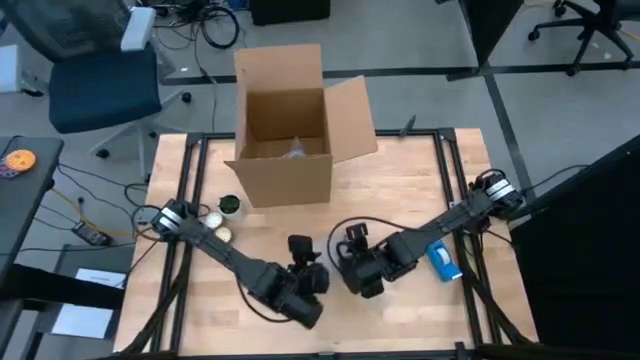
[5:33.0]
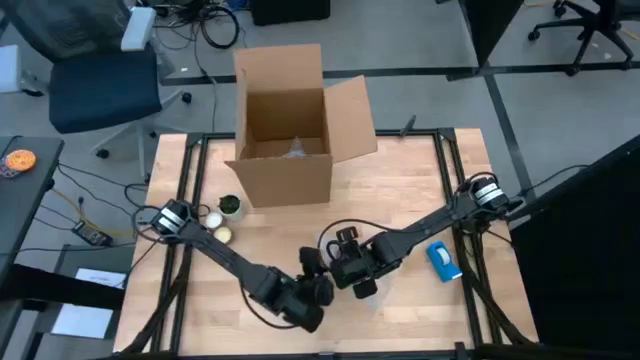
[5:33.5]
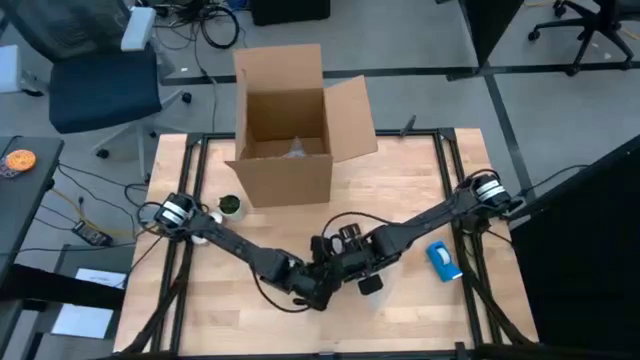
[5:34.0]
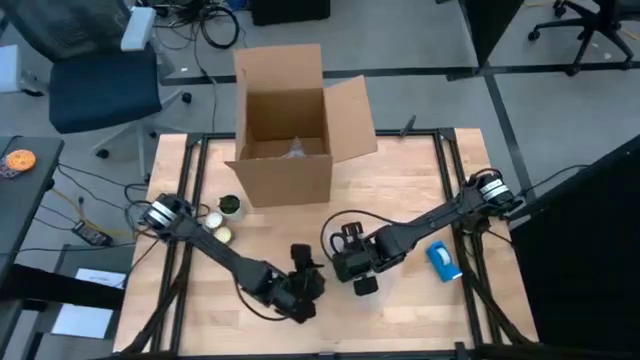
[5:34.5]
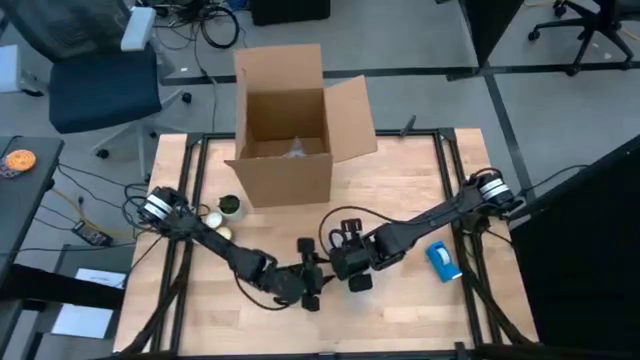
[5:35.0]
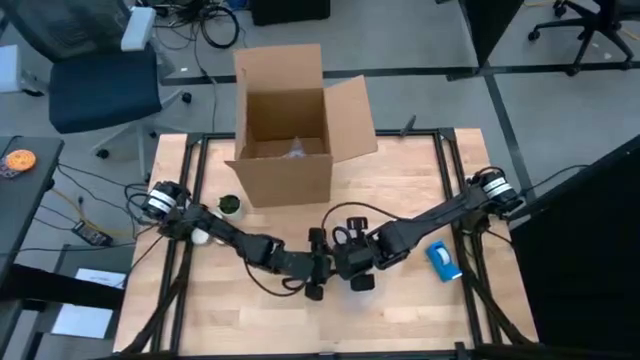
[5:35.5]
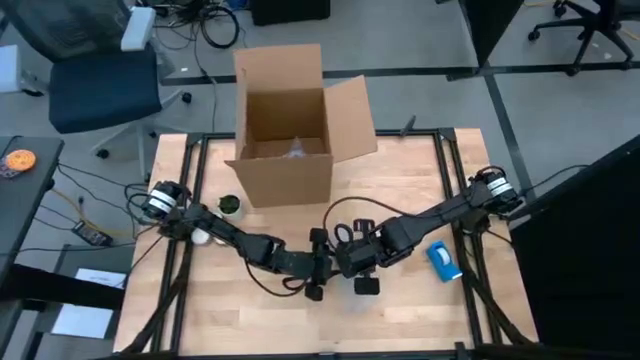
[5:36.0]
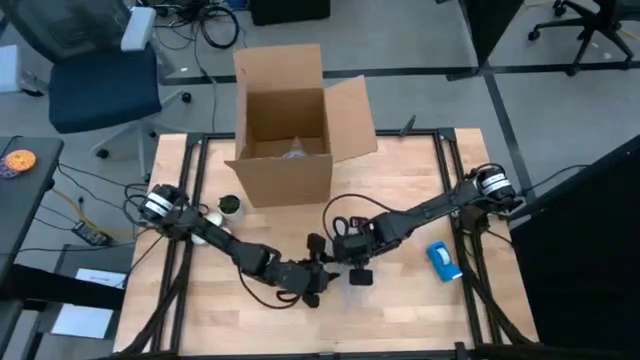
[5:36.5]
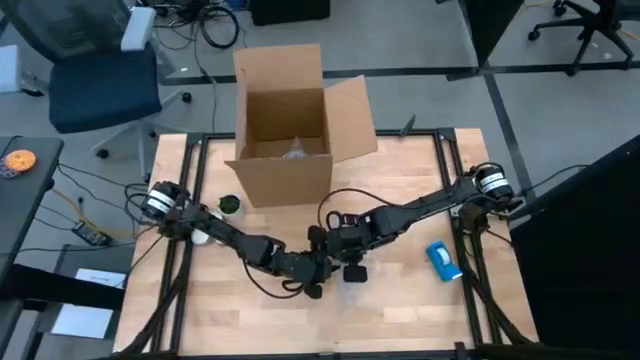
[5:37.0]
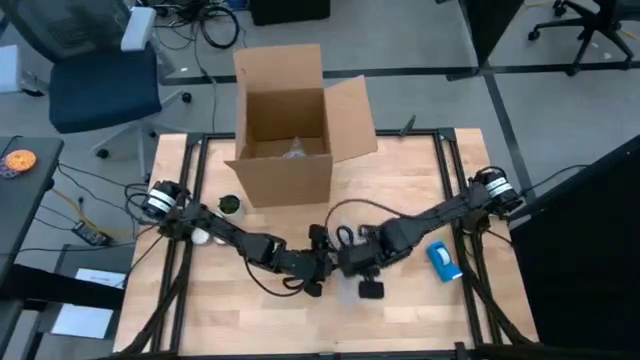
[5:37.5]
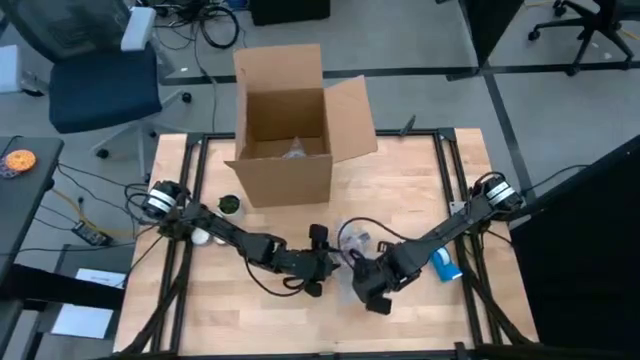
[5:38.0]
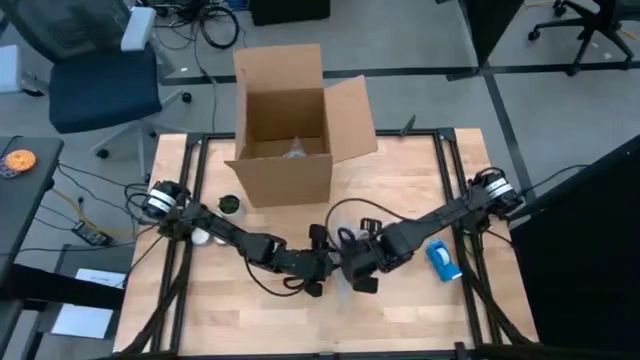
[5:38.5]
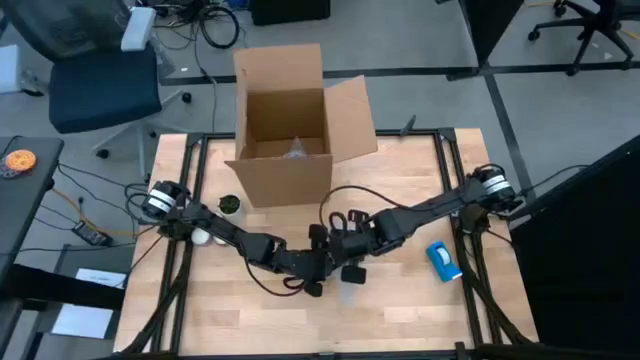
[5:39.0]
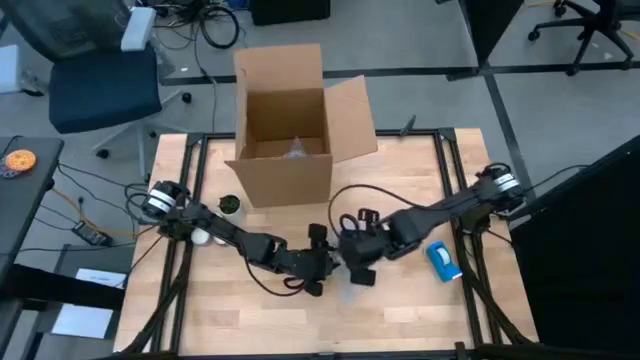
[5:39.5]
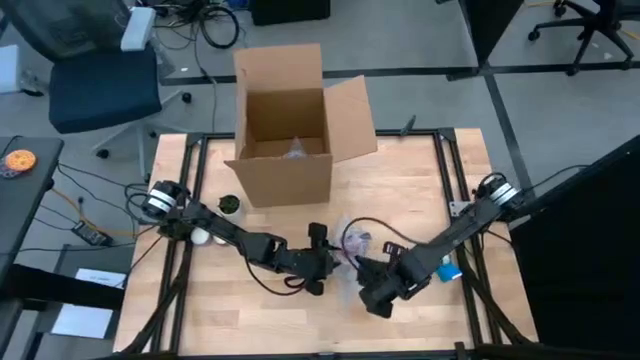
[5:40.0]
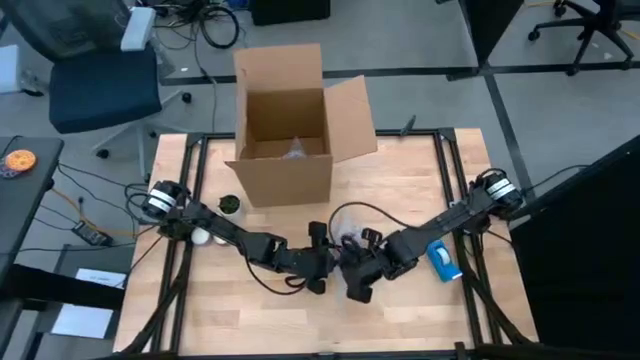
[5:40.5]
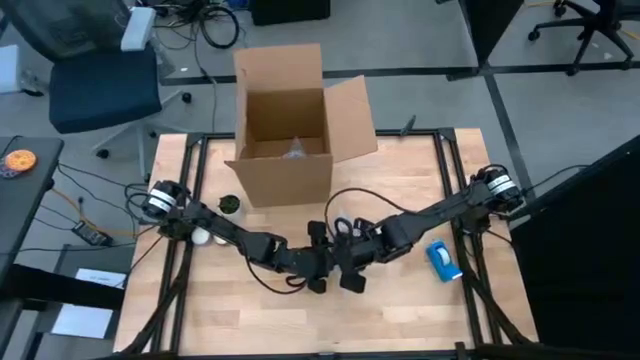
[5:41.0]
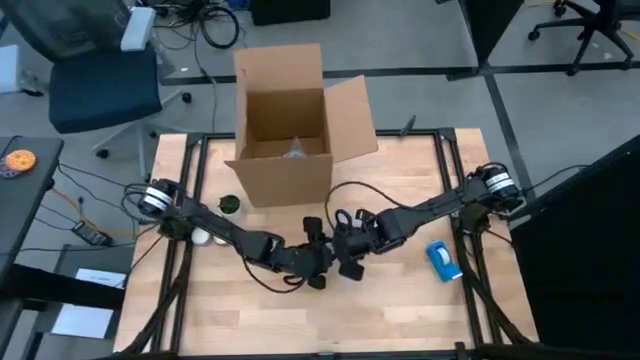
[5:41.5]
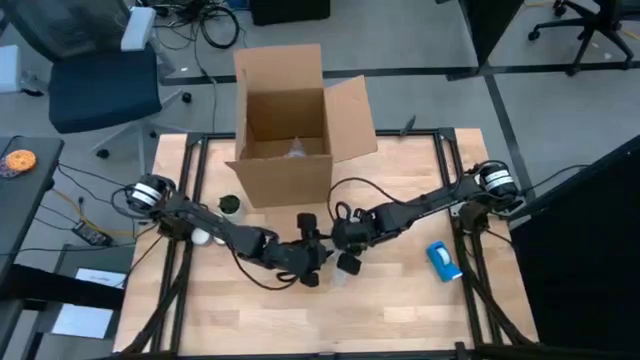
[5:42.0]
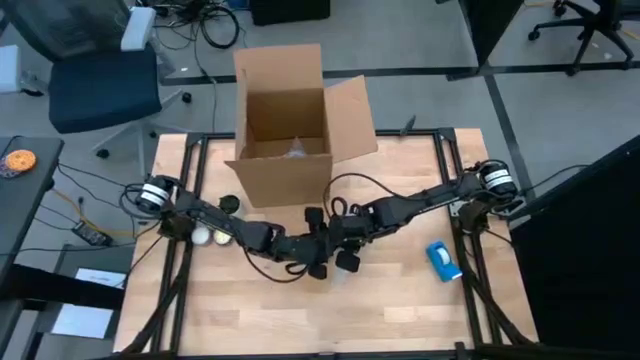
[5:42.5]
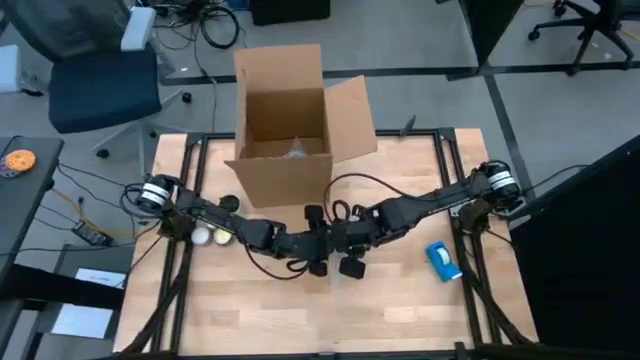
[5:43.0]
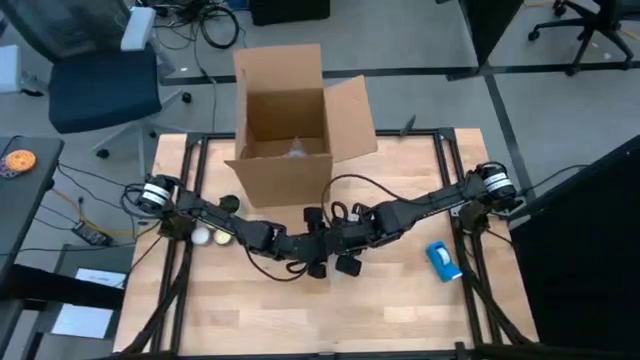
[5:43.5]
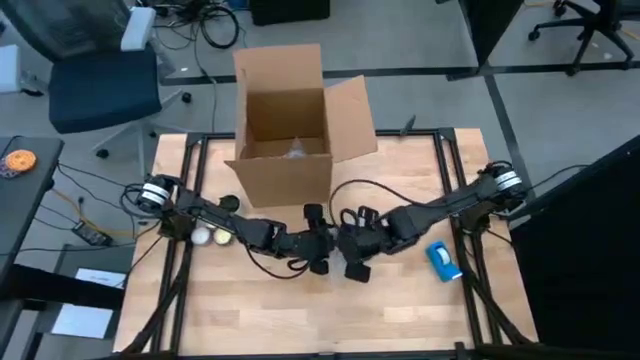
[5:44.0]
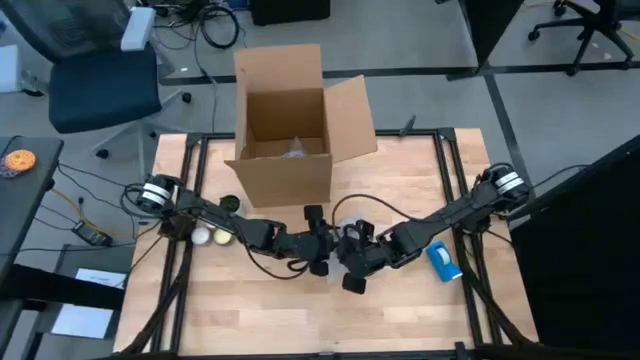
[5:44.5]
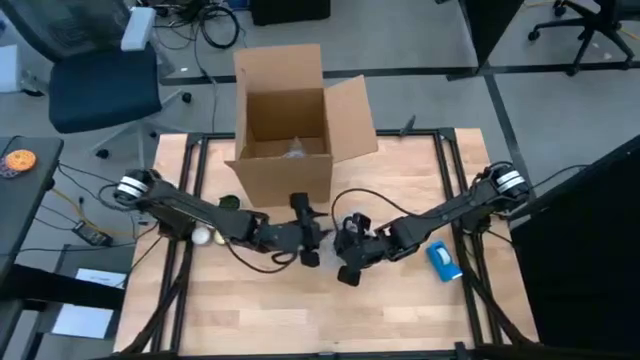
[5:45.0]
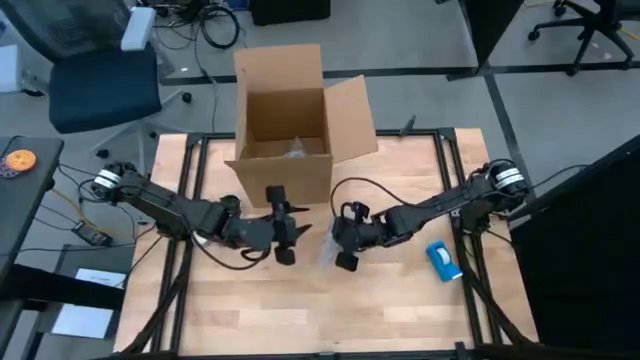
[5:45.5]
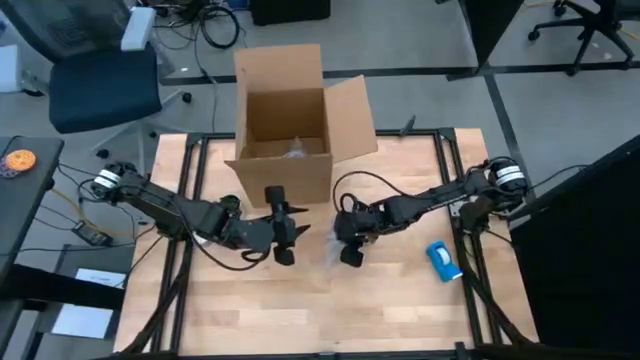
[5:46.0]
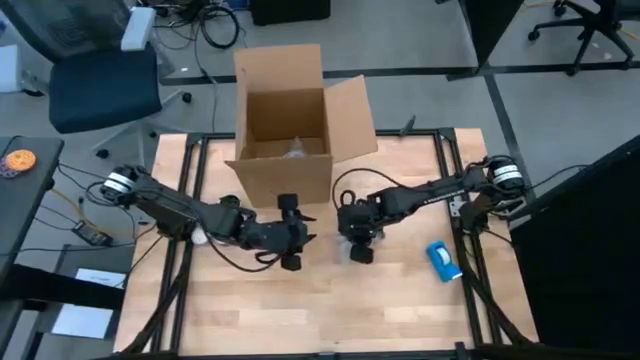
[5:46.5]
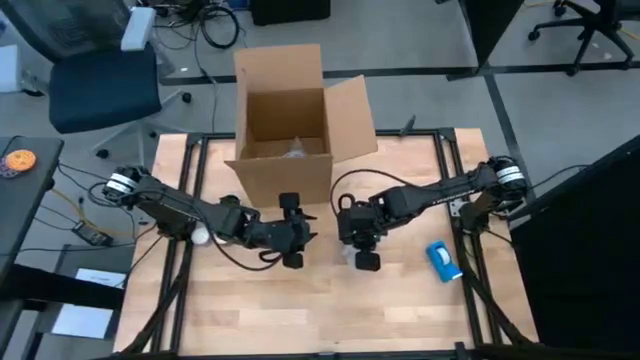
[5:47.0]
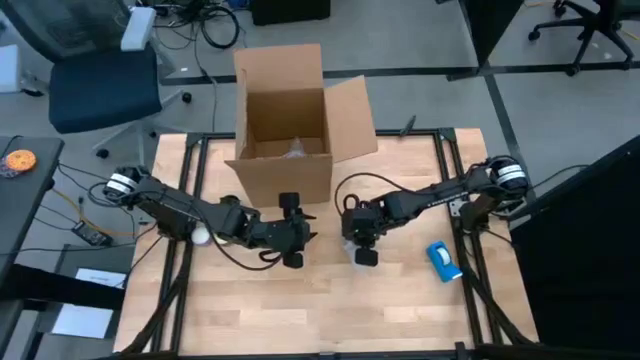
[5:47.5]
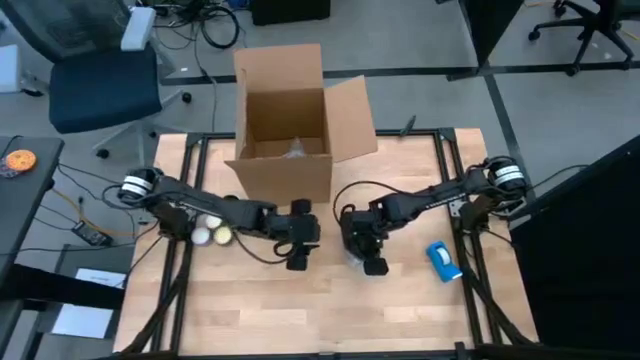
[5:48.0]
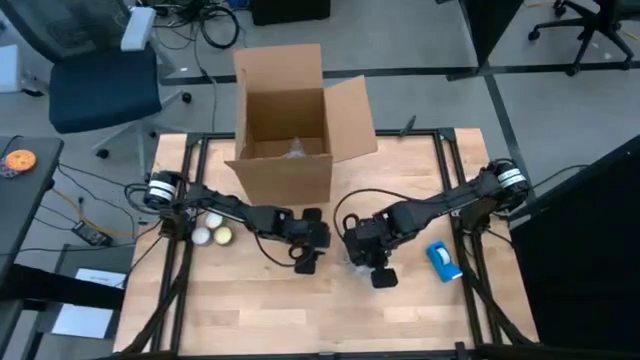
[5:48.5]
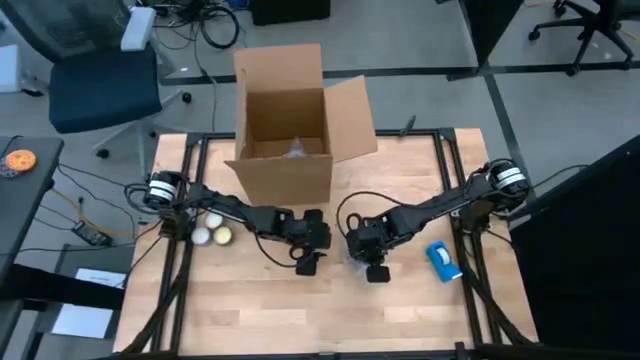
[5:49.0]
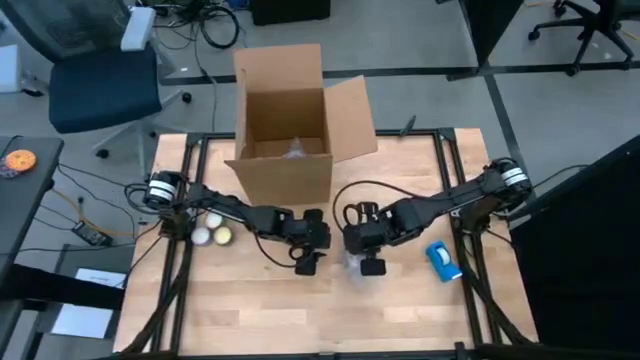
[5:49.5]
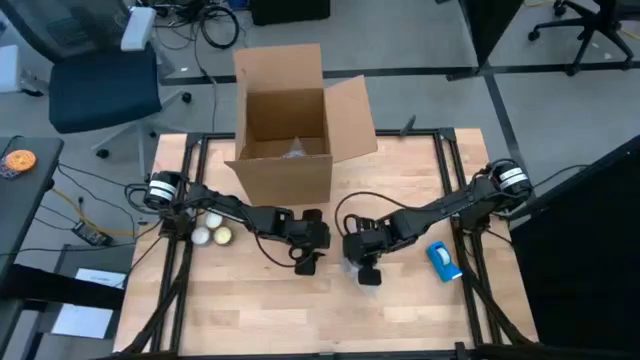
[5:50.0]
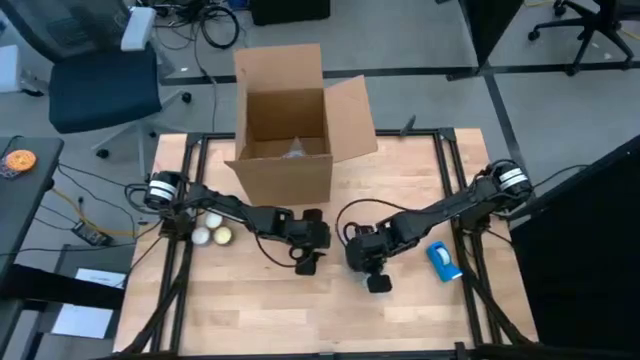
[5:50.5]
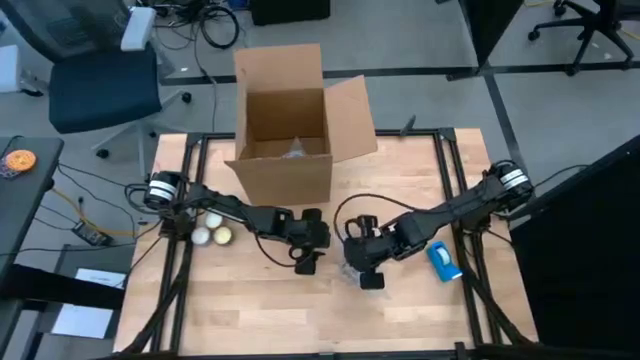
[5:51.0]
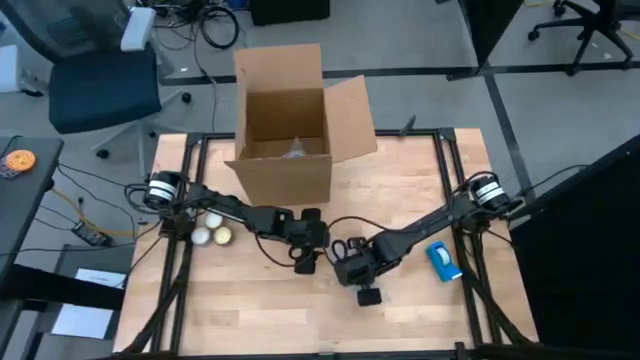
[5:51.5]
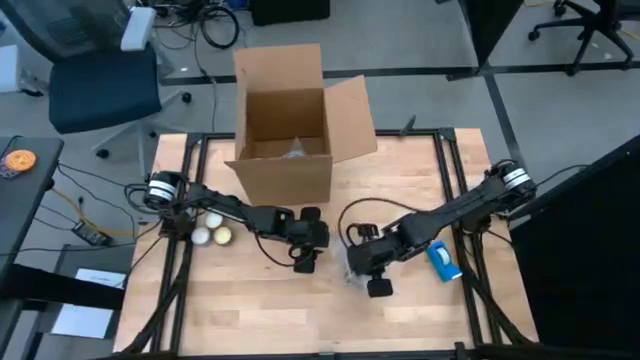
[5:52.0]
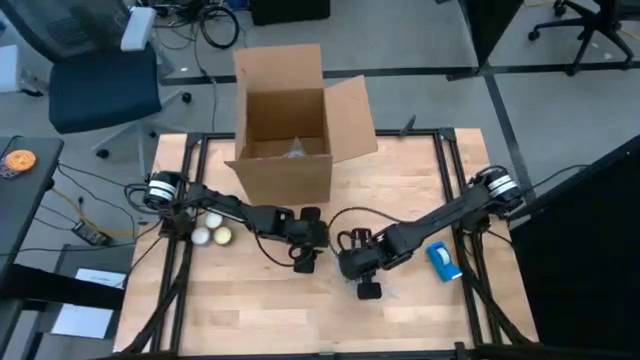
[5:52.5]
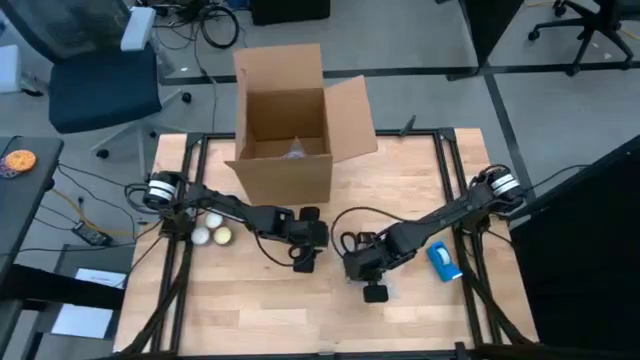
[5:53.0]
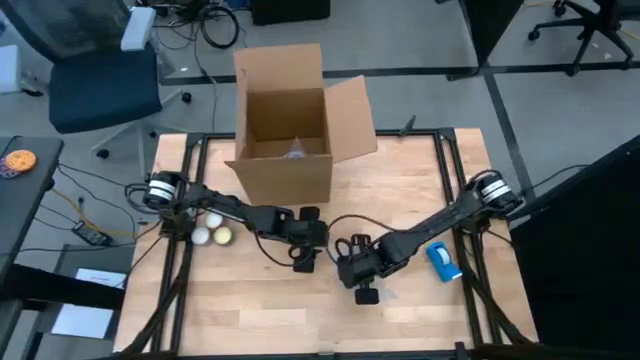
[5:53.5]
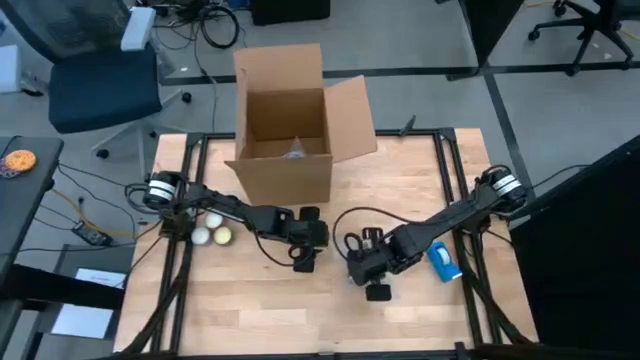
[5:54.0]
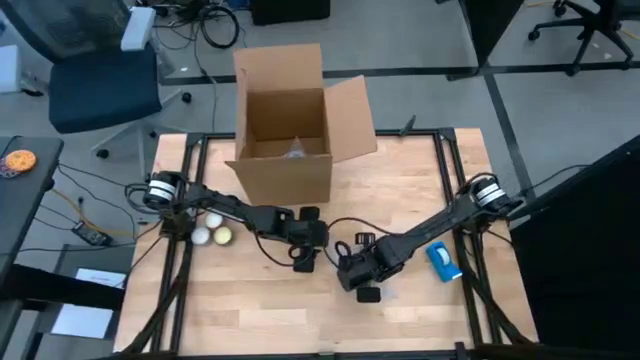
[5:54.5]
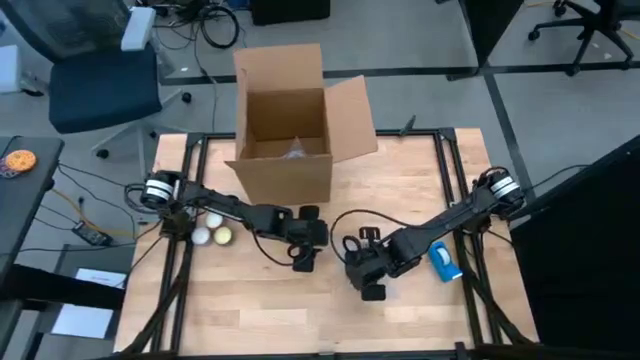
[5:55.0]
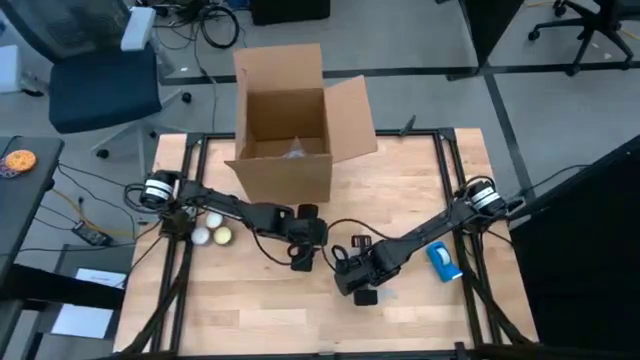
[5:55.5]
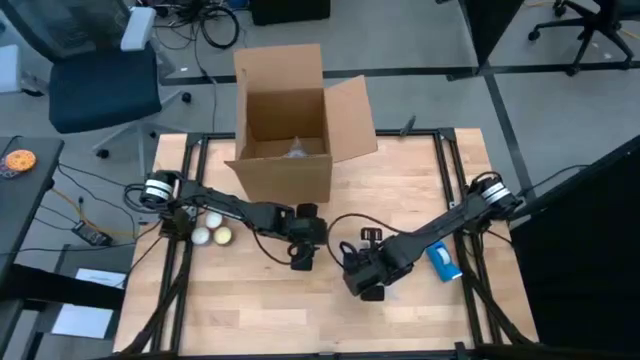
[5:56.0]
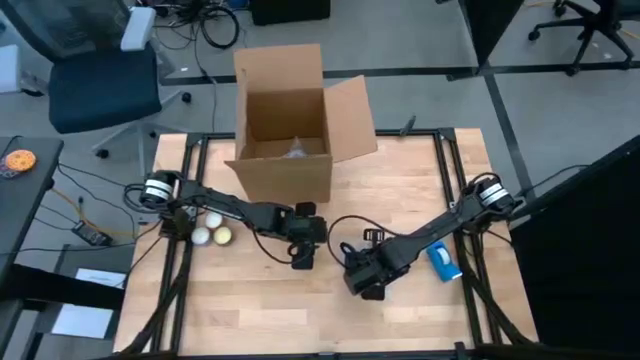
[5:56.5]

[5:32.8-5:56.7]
Task: wrap mug
Wrap the black mug with bubble wrap
